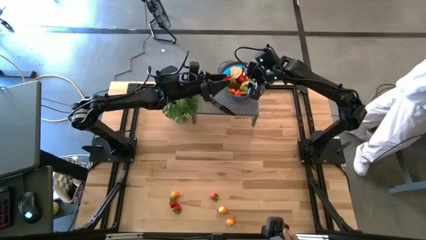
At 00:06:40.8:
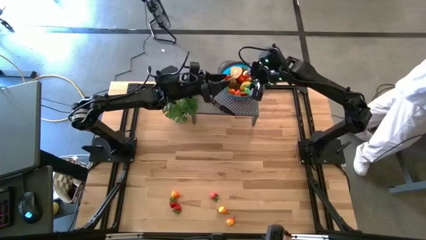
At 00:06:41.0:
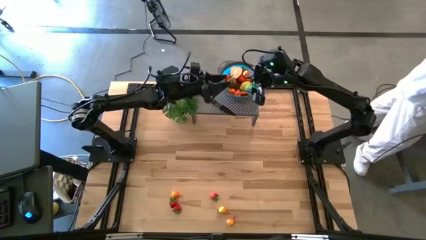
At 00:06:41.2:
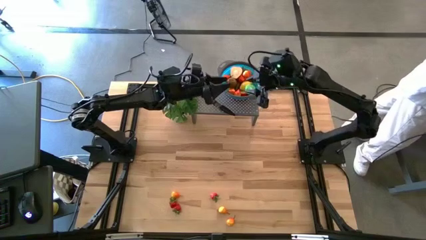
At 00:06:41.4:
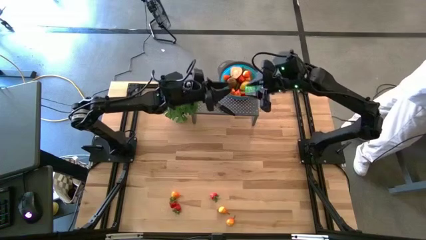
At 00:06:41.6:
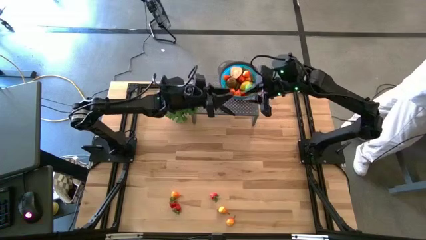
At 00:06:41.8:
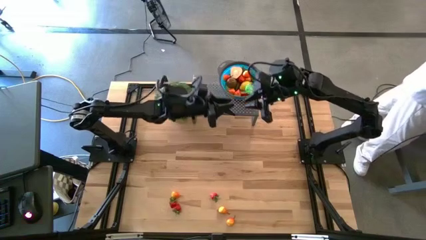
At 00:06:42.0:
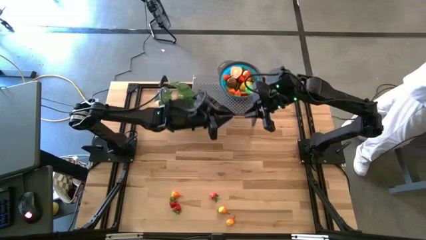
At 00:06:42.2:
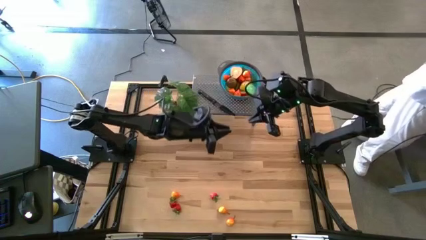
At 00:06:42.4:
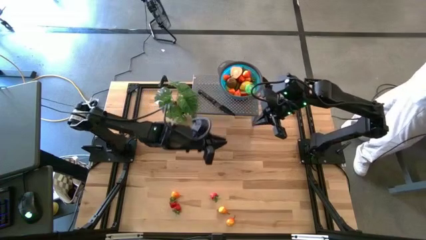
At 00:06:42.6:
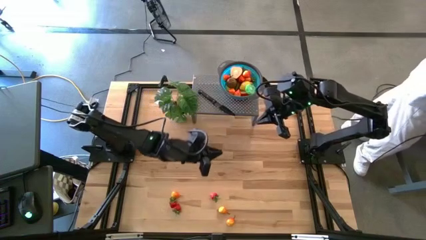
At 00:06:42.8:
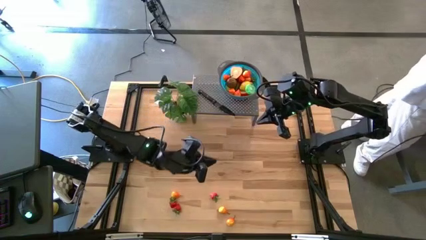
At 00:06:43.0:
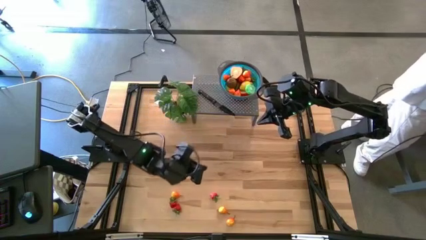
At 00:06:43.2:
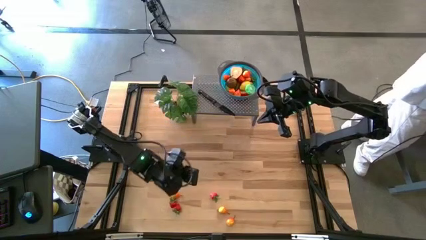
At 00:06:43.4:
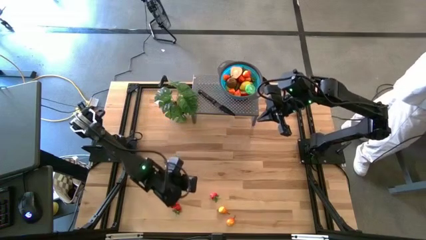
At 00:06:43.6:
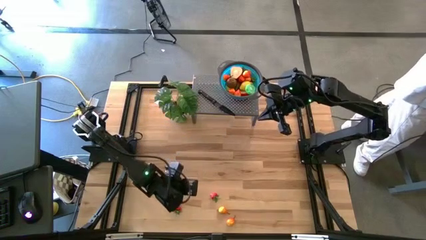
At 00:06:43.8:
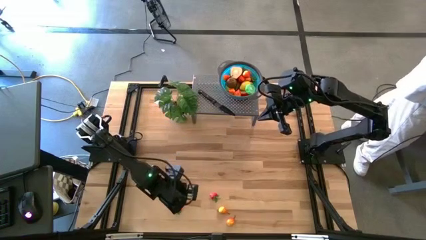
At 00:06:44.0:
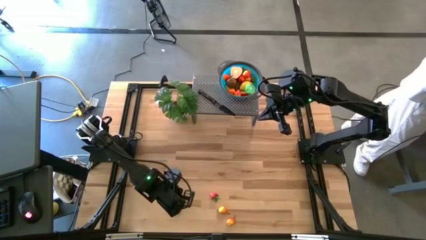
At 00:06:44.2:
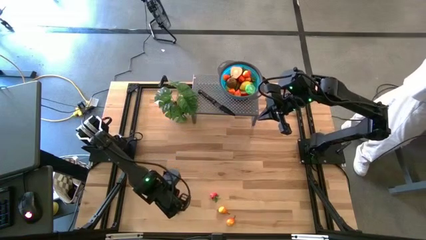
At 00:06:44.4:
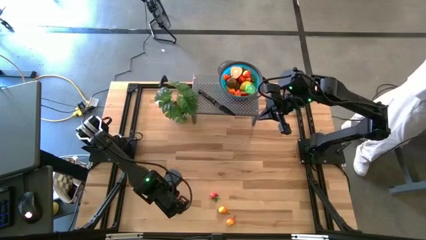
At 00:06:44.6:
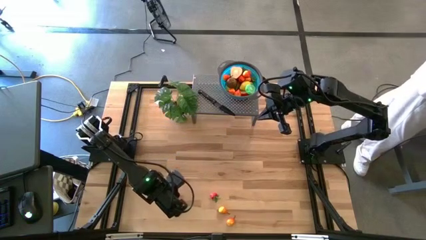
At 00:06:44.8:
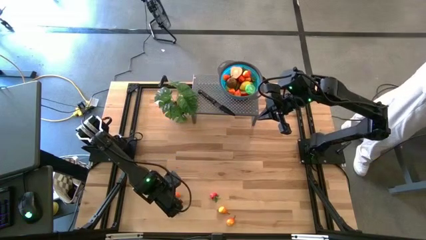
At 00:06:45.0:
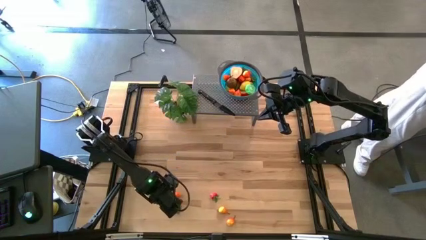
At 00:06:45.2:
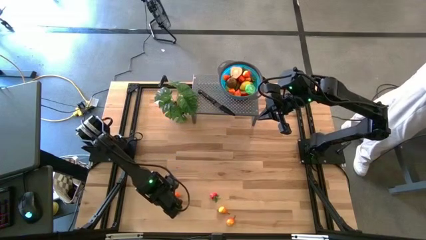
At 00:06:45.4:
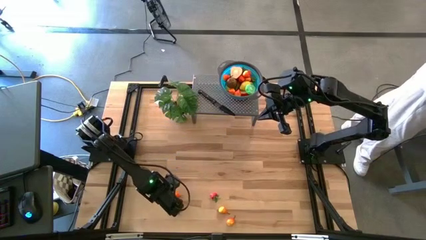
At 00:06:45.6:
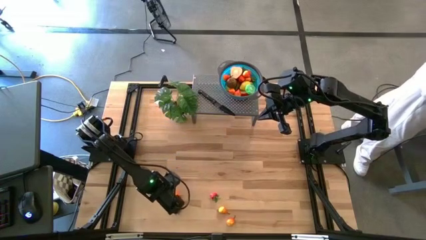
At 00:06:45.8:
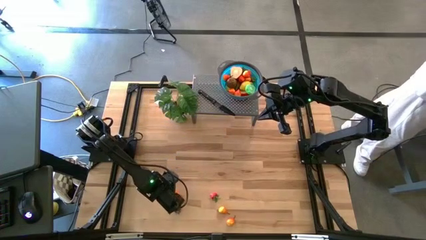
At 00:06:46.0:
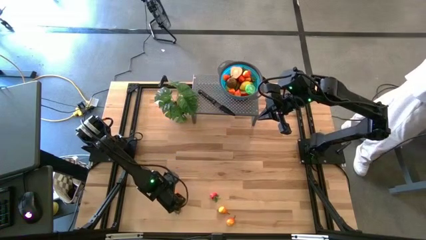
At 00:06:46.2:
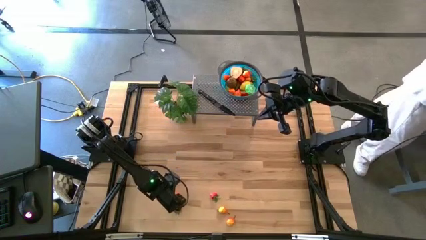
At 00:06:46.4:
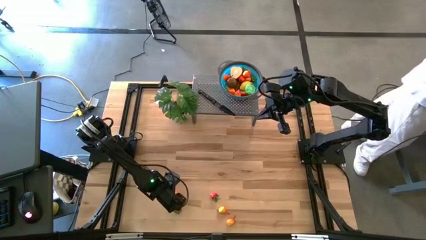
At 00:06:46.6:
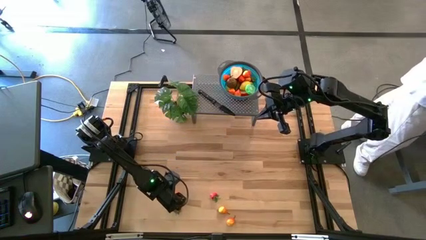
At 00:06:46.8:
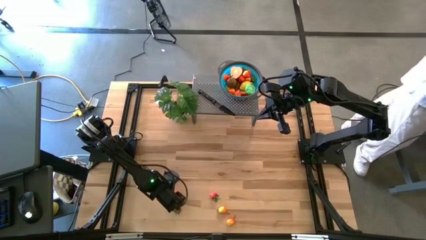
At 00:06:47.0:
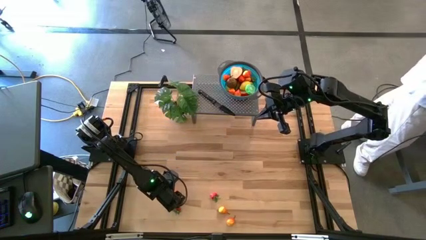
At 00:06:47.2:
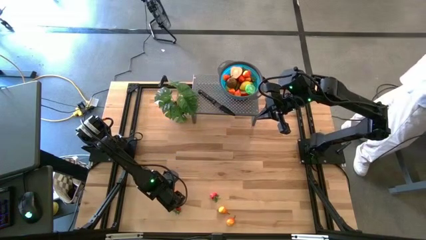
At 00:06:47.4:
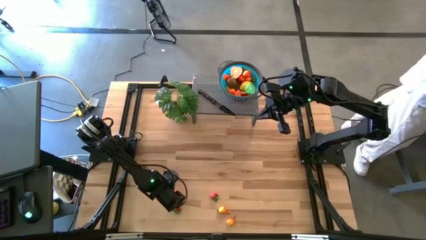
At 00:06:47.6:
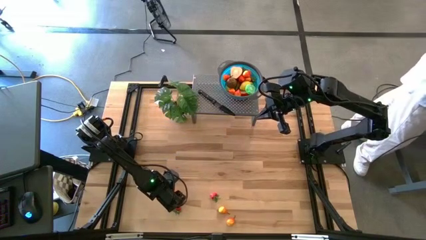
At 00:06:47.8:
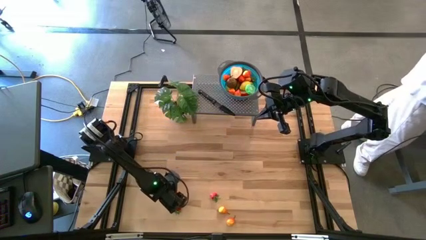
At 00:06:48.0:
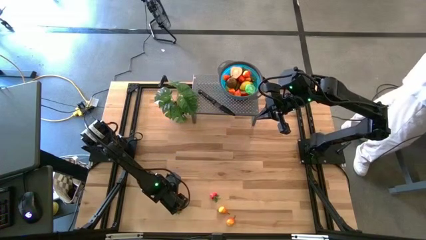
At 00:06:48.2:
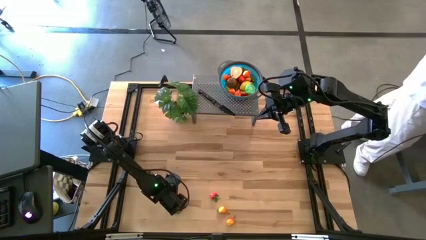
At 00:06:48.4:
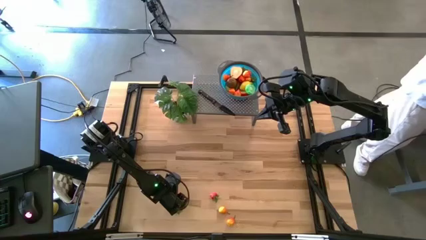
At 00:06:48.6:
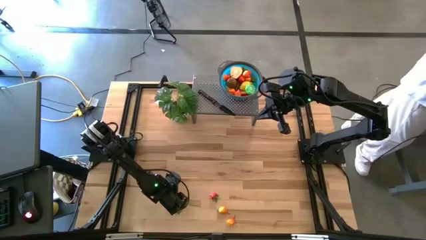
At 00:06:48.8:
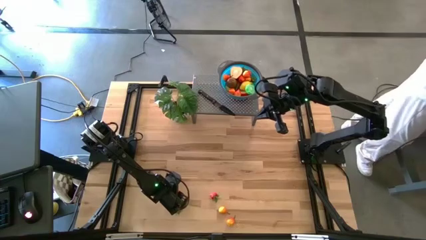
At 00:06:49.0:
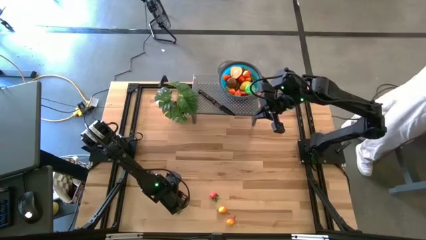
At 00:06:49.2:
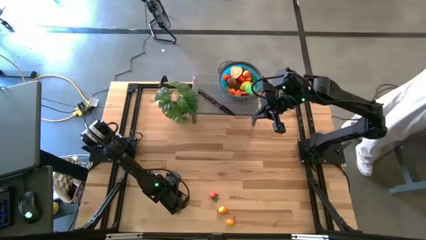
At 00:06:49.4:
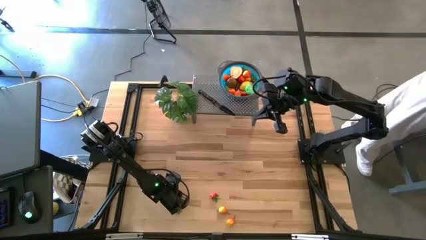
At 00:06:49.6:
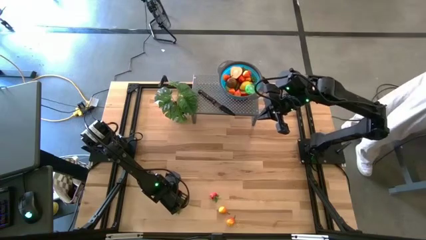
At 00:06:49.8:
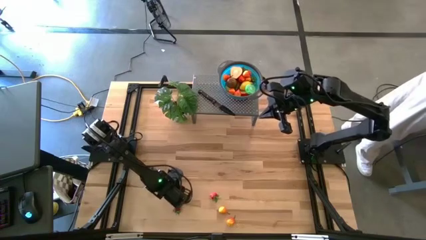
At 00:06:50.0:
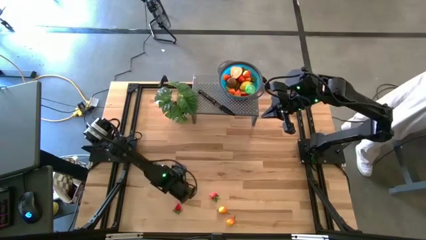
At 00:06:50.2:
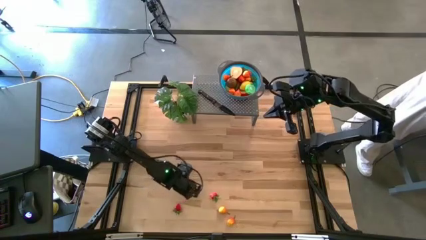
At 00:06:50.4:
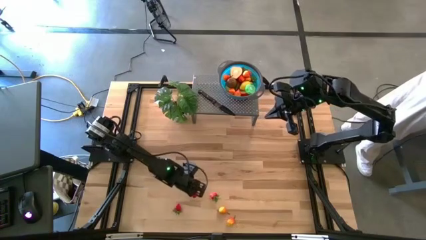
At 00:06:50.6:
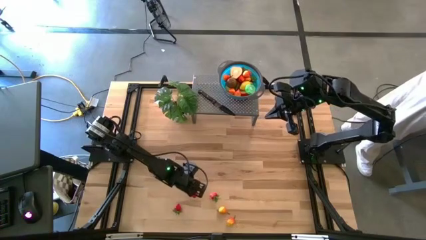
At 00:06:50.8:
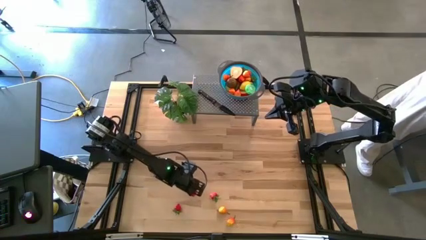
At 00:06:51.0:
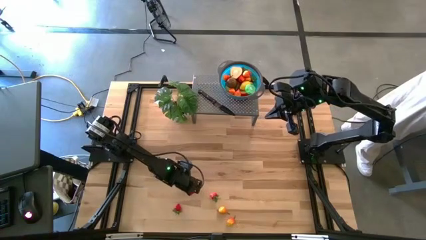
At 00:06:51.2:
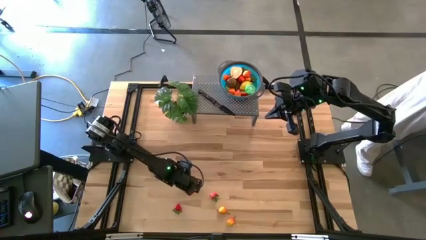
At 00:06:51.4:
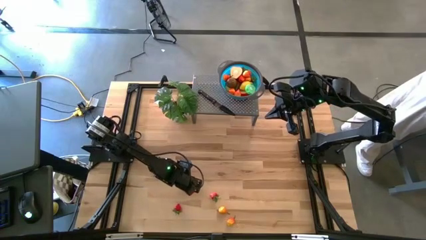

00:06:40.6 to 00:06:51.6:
Task: Pick & Place Fruit
Put the yellow pear in the blue bowl on the shelf

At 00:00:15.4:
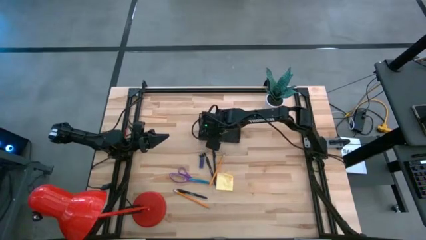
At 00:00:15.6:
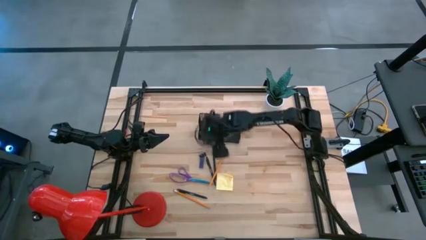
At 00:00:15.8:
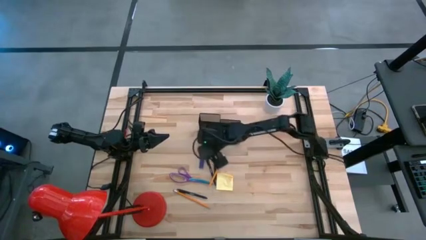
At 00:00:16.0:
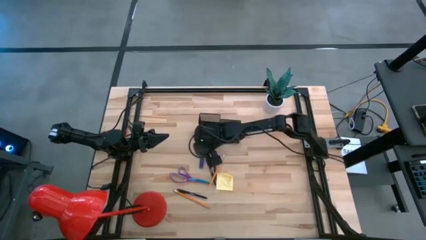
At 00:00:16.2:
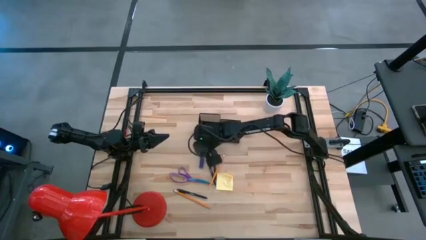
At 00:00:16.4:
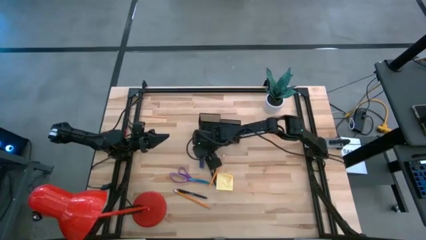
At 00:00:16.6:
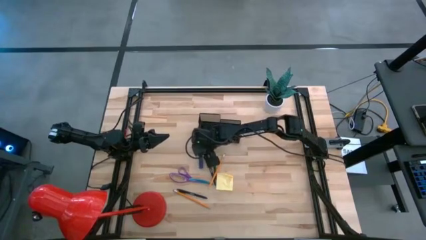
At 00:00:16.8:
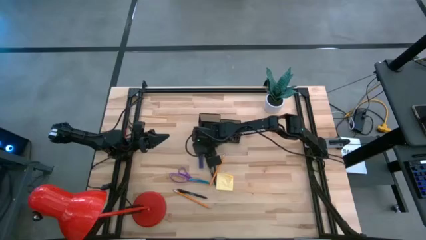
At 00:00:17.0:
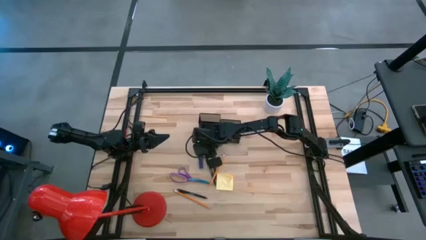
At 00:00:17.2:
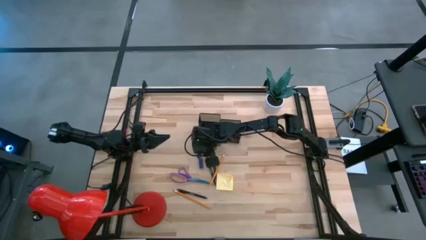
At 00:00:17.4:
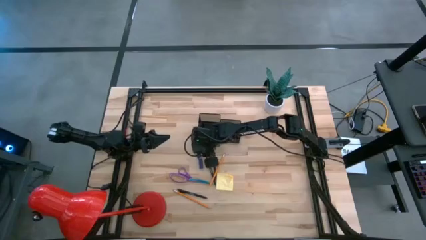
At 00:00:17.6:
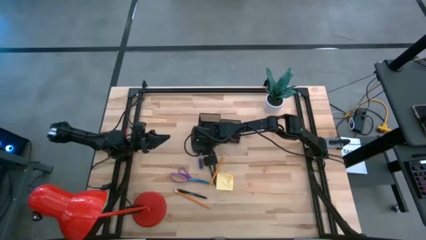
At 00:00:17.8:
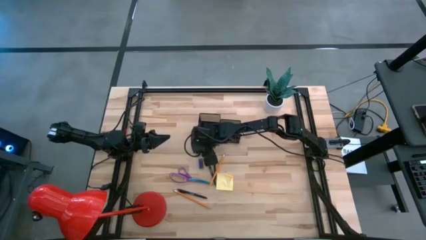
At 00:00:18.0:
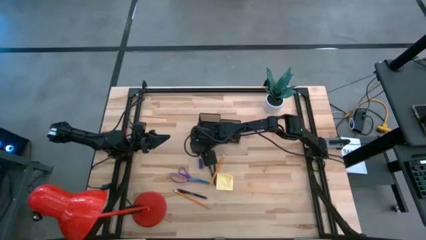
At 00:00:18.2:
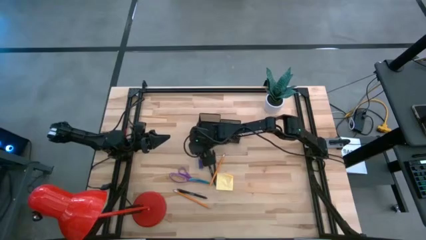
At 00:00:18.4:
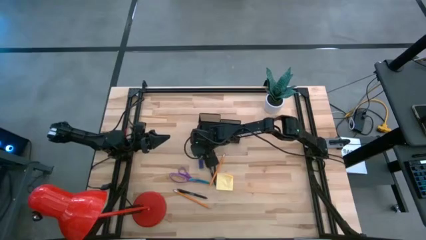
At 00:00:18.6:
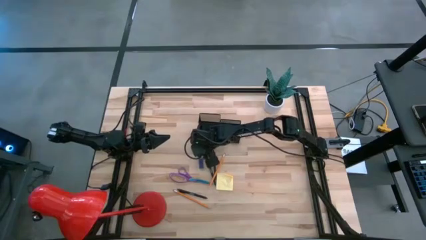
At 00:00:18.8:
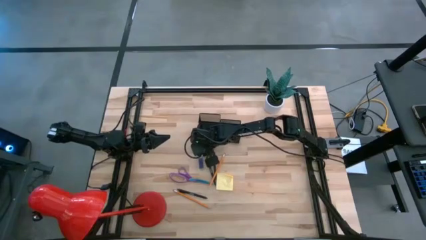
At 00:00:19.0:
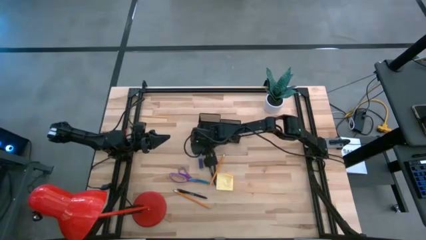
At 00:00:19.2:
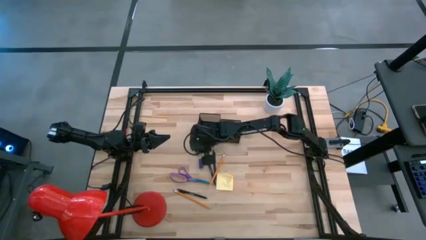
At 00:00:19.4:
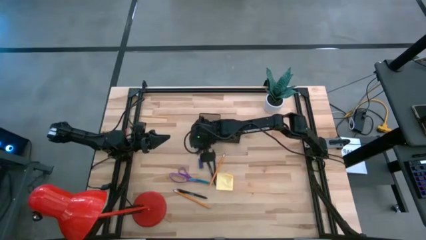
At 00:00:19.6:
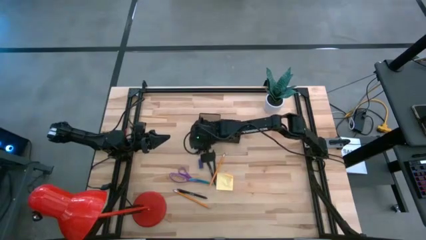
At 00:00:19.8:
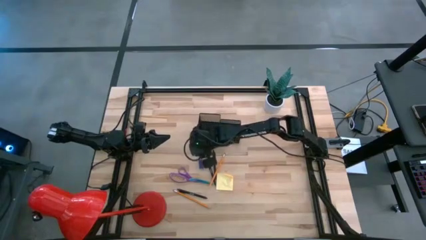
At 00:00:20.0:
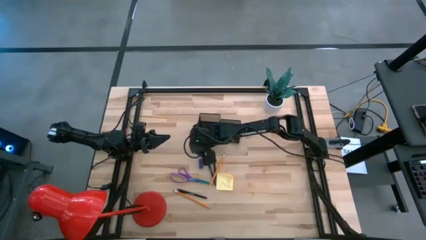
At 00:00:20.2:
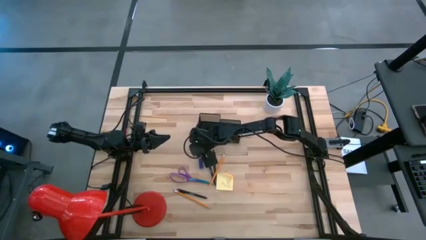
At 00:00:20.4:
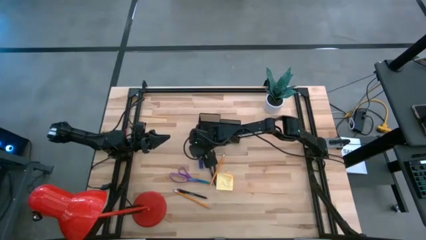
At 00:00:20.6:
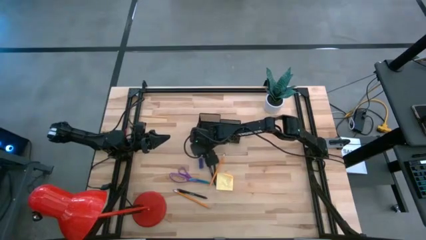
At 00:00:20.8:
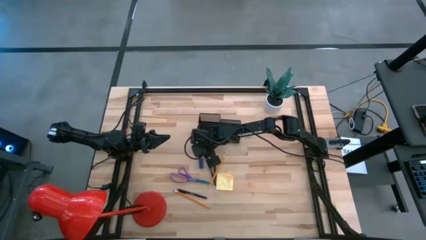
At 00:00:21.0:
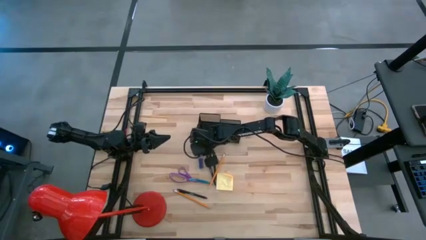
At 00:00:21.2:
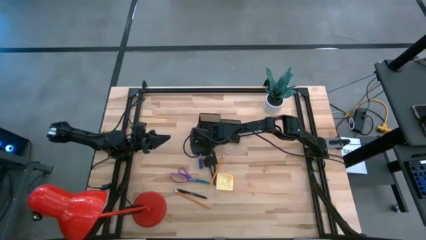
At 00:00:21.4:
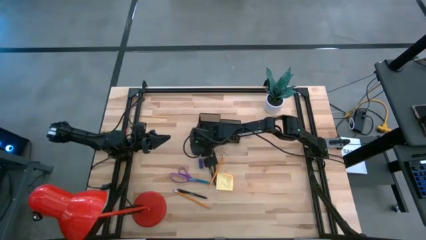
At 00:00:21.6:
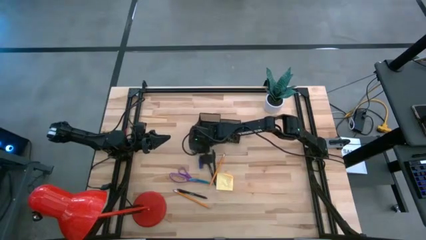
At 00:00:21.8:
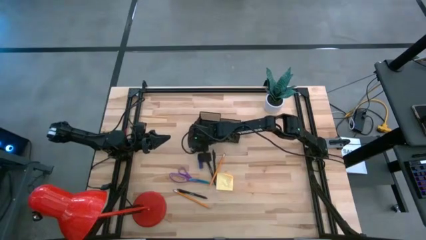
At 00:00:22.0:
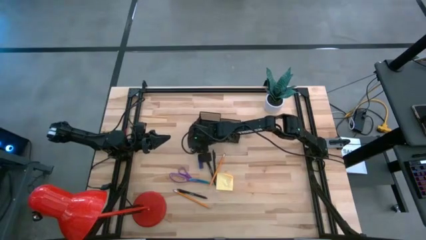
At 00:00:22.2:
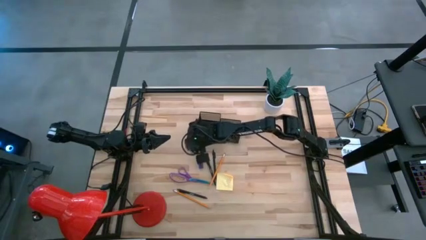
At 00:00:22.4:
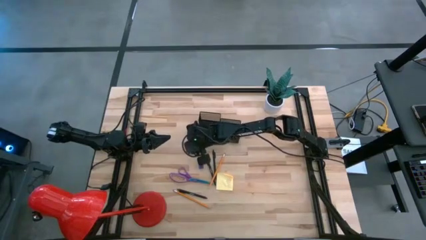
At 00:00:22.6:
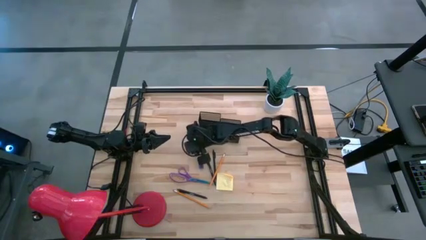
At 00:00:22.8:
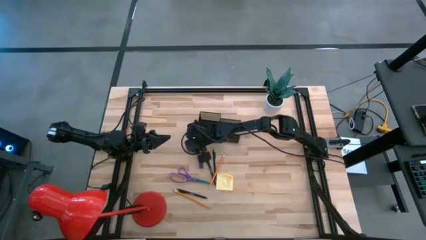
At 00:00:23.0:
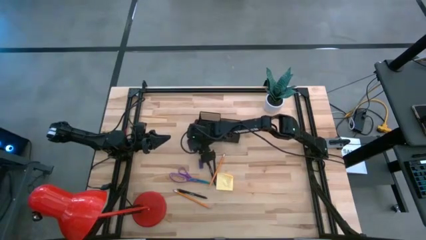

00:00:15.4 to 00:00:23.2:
Task: Pick and place office supplies into organizer
Put the black binder clip into the desk organizer
